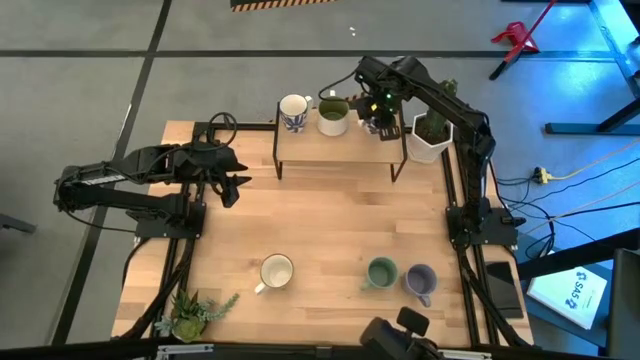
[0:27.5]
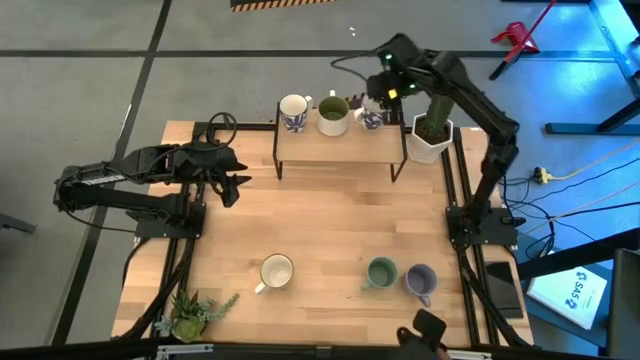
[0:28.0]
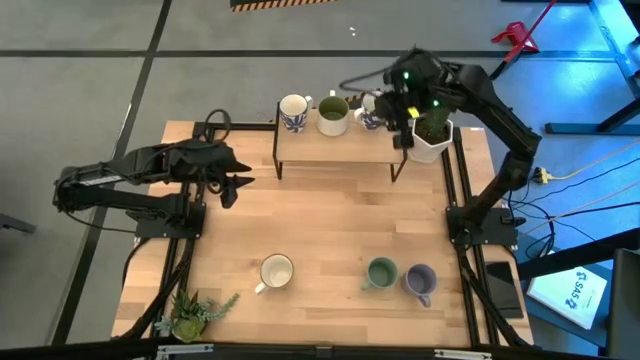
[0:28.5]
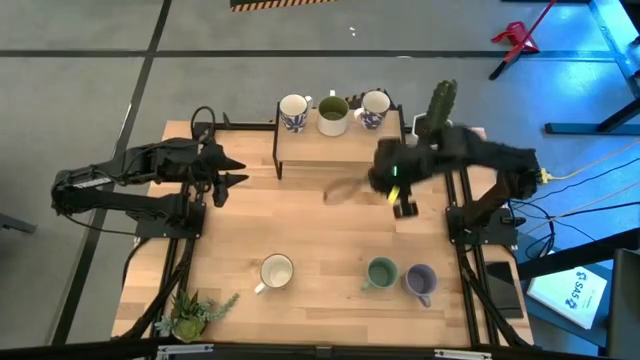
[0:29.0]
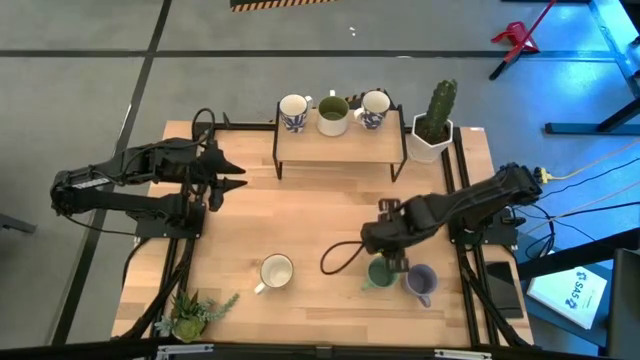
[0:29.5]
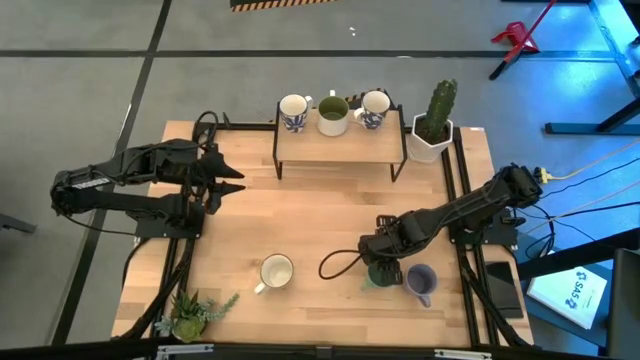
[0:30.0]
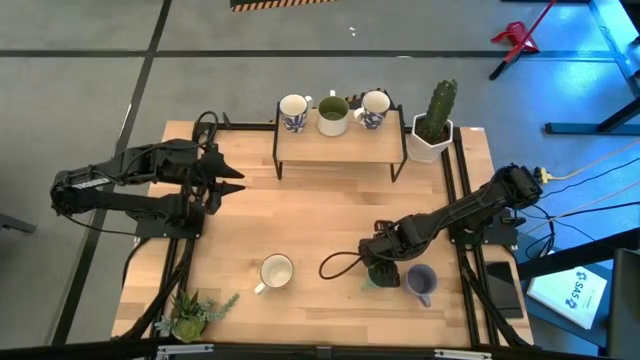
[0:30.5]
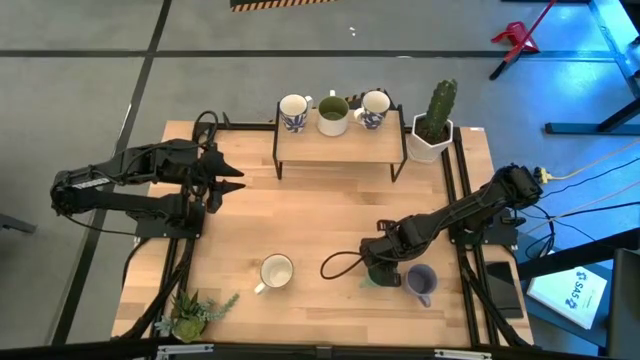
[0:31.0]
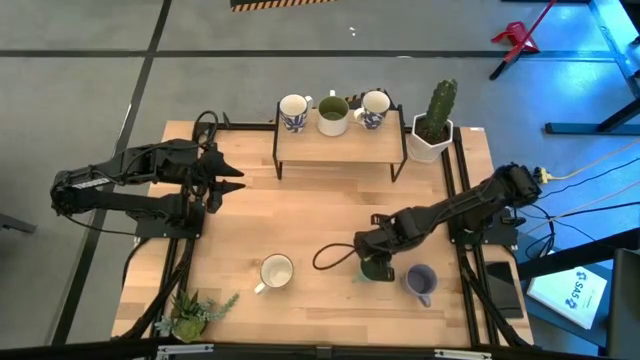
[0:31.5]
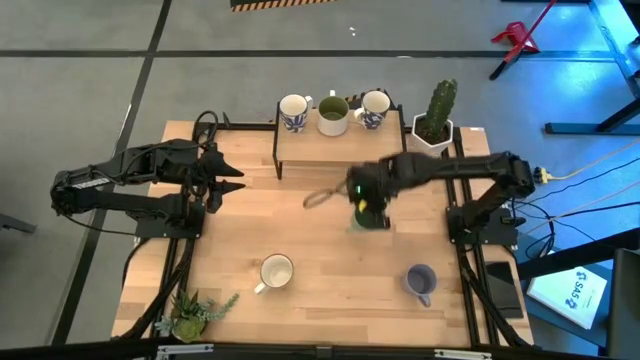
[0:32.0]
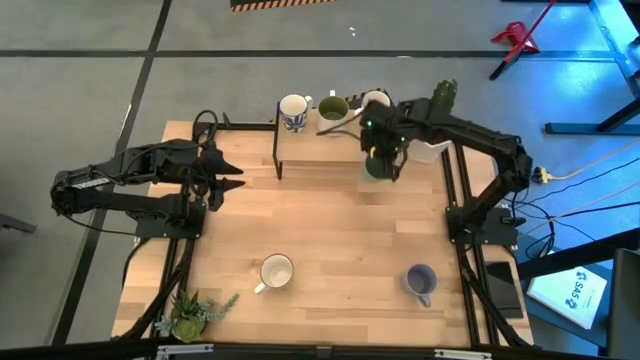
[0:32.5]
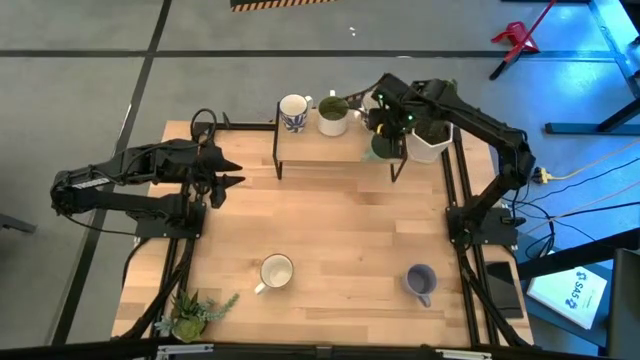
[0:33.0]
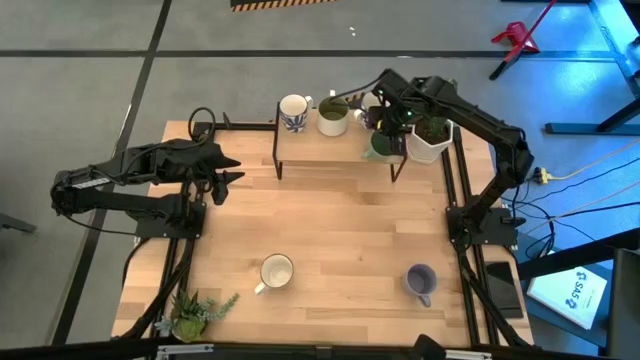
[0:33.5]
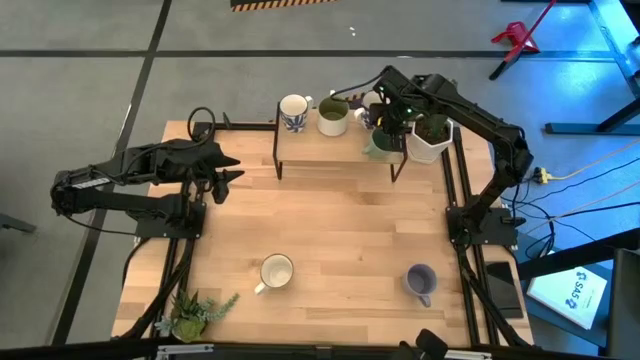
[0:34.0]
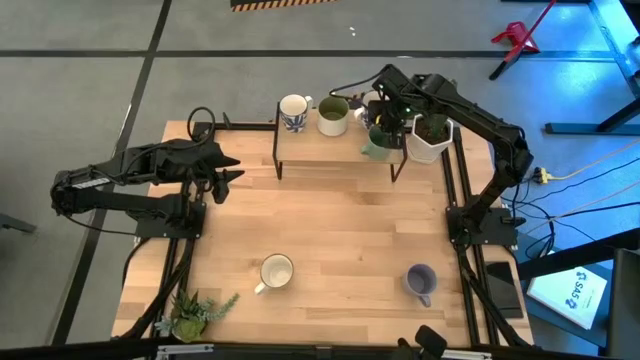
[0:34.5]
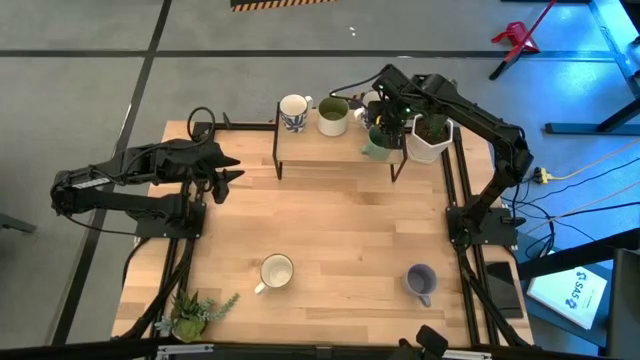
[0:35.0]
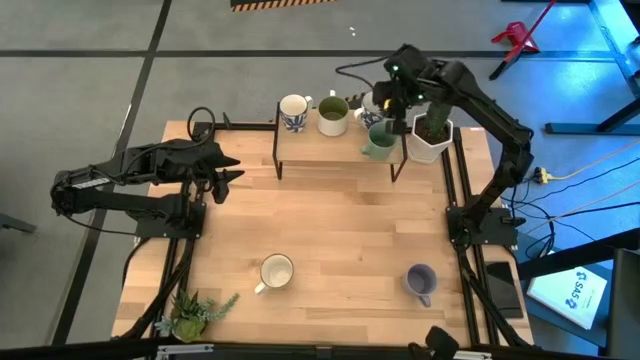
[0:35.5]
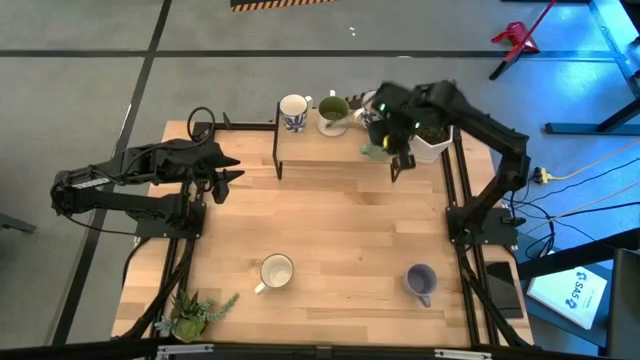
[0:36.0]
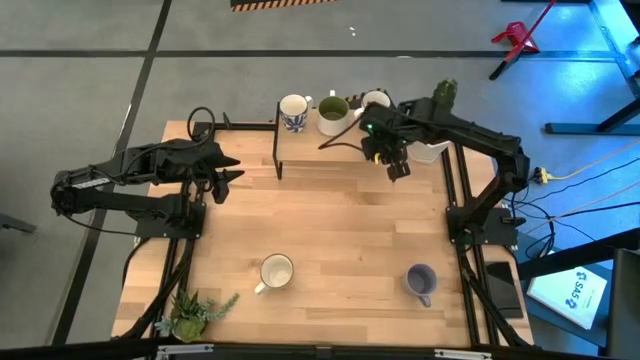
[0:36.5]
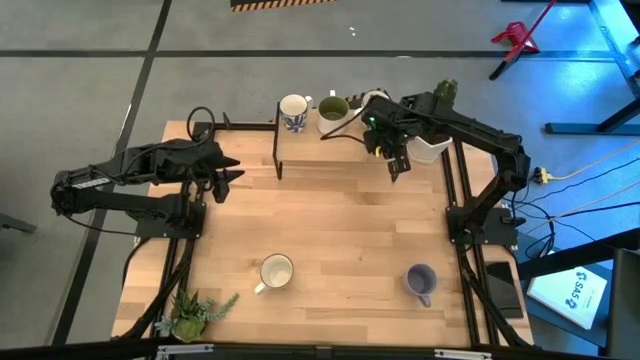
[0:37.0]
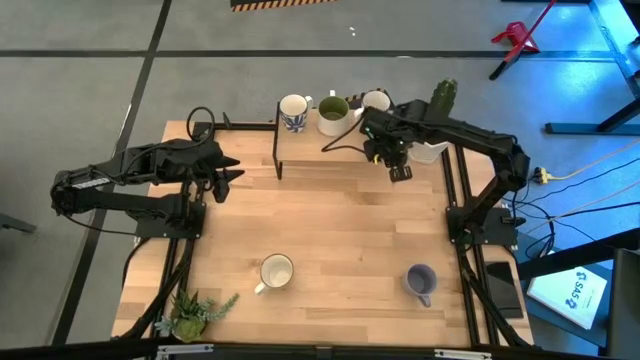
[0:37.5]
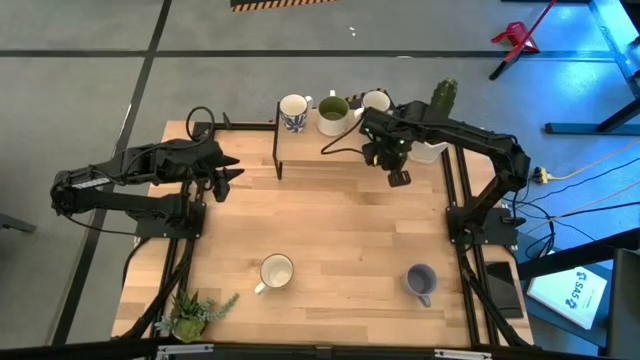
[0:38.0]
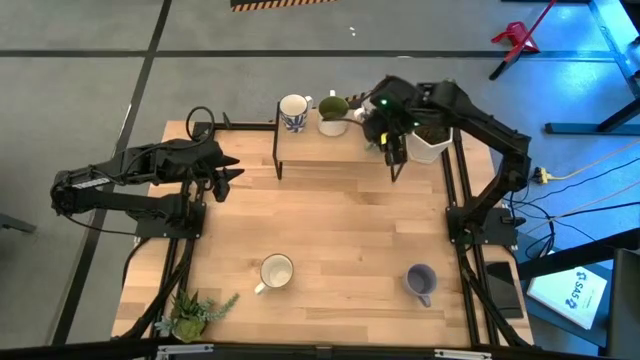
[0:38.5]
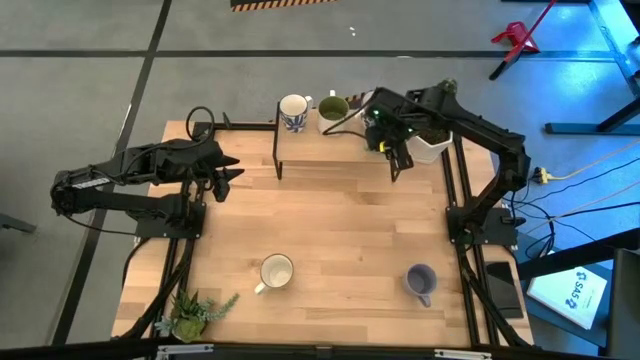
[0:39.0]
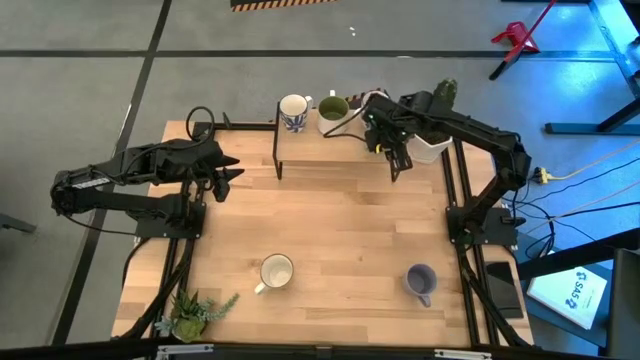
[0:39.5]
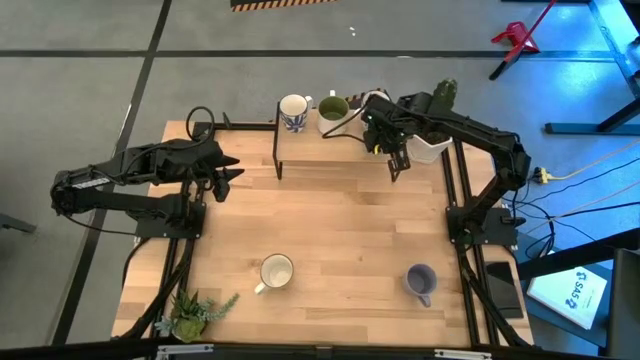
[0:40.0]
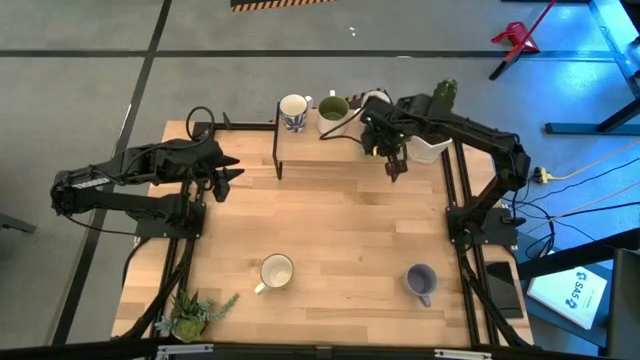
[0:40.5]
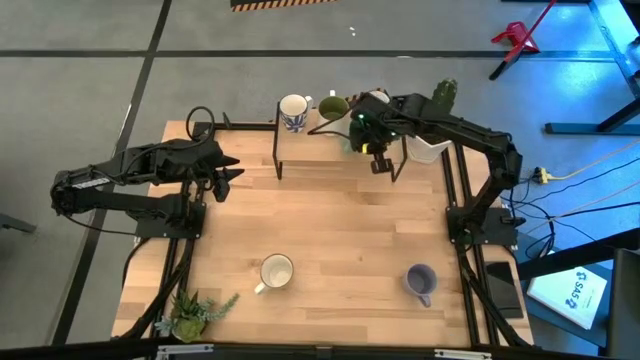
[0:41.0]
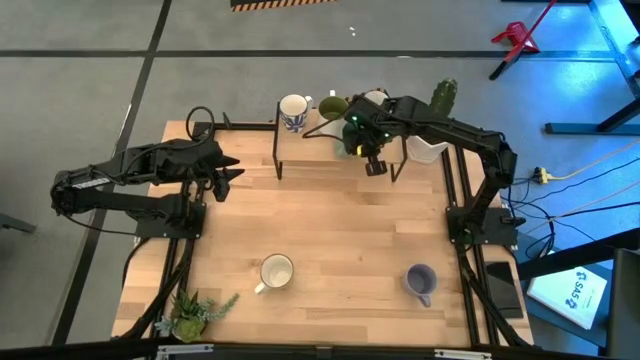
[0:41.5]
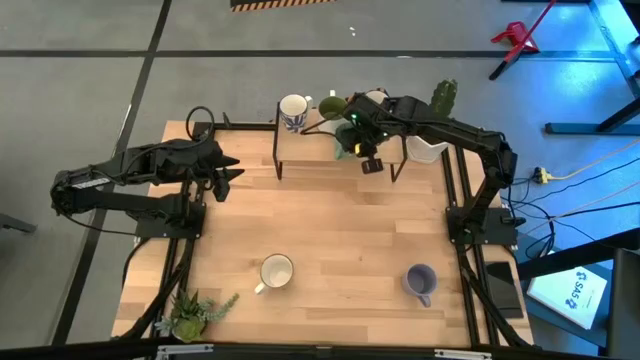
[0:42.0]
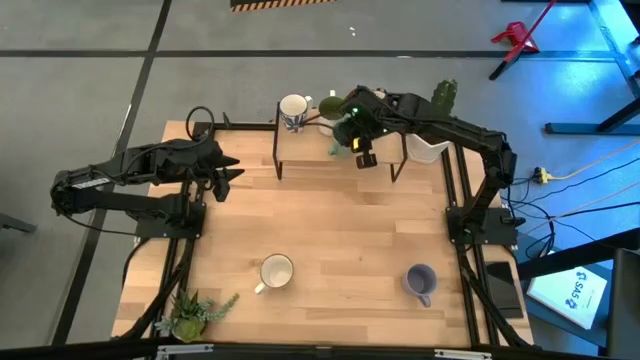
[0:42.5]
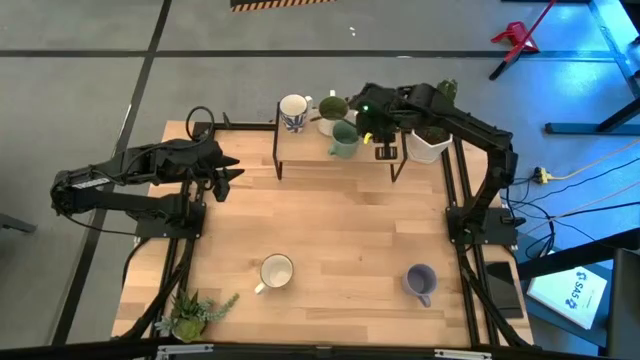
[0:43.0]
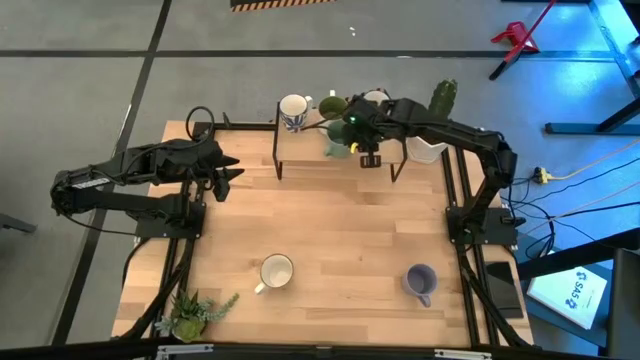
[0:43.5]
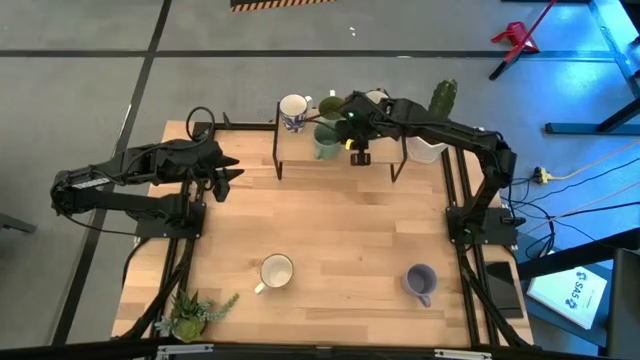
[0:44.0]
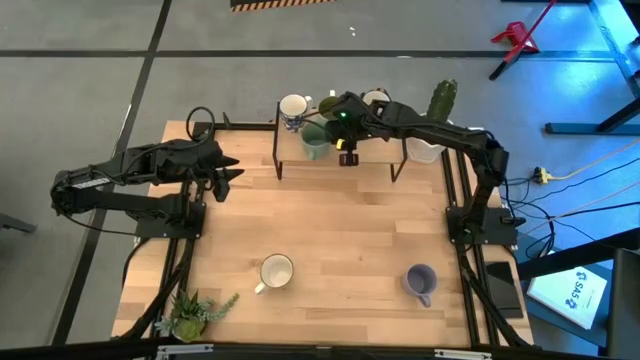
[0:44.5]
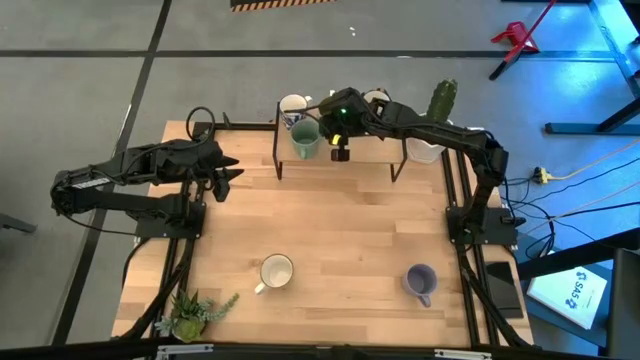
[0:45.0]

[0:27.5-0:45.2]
Task: Place coffee mugs
Put the green mug on the shelf
